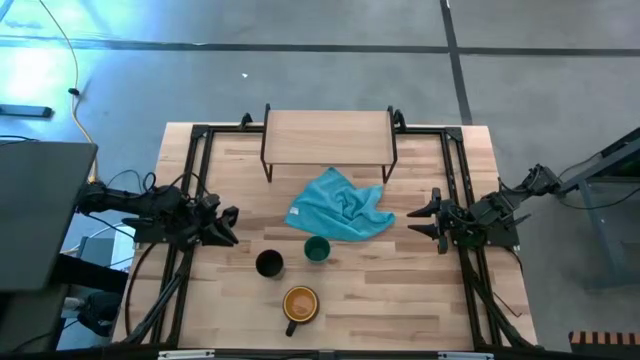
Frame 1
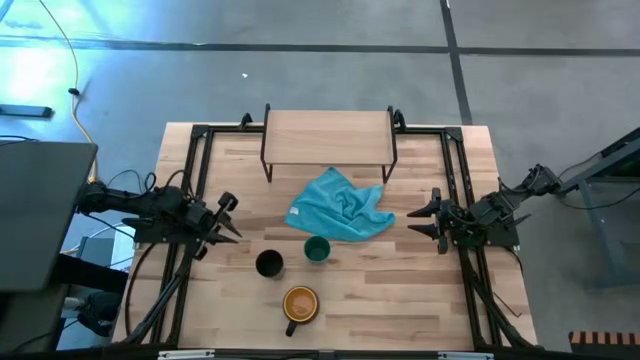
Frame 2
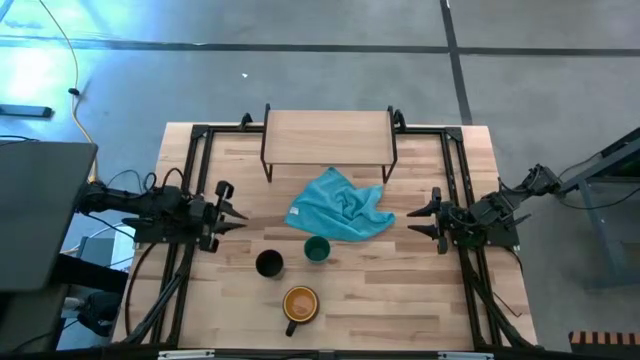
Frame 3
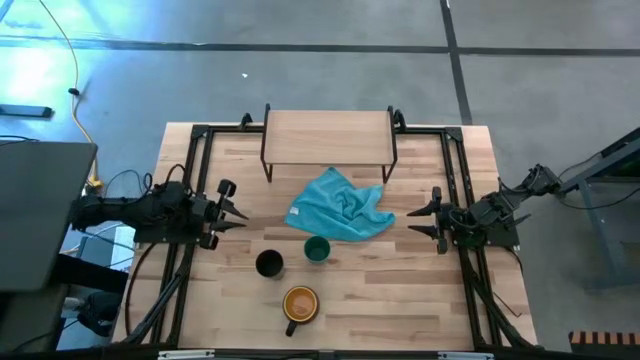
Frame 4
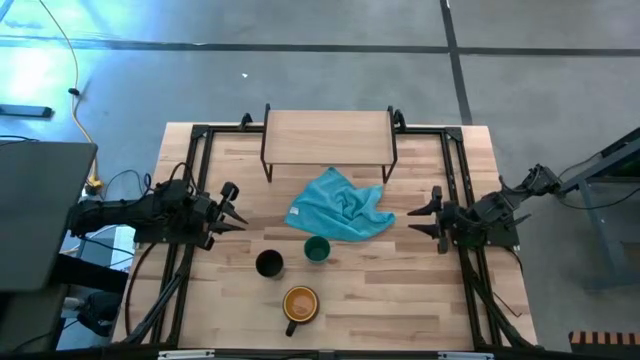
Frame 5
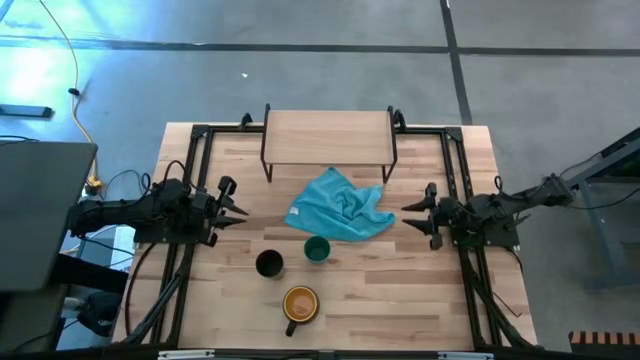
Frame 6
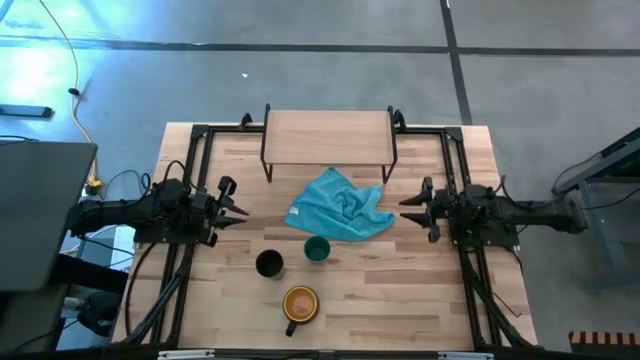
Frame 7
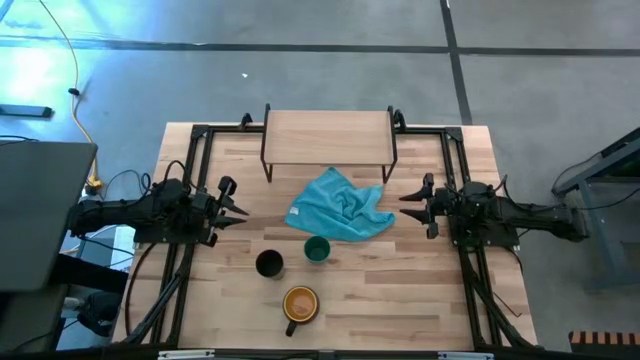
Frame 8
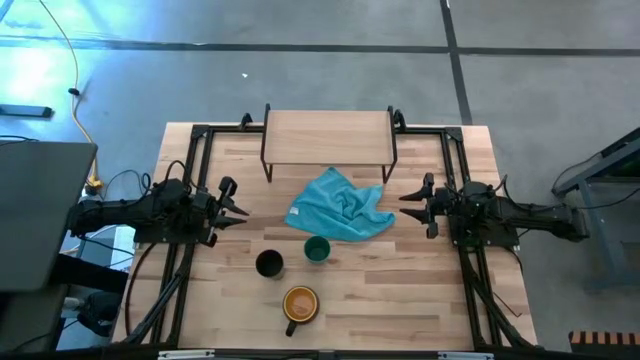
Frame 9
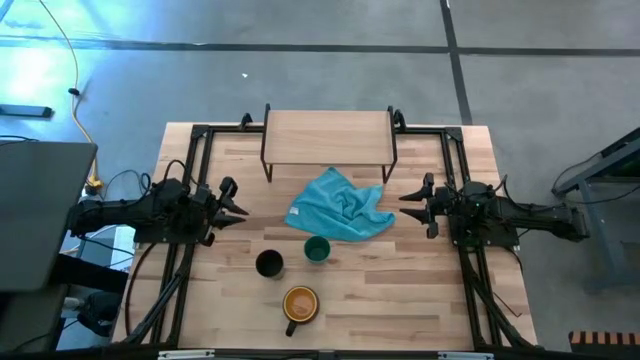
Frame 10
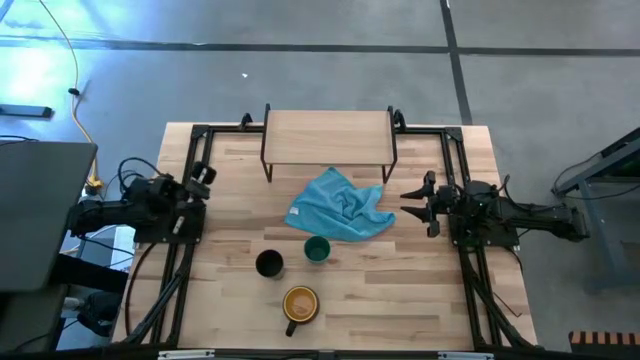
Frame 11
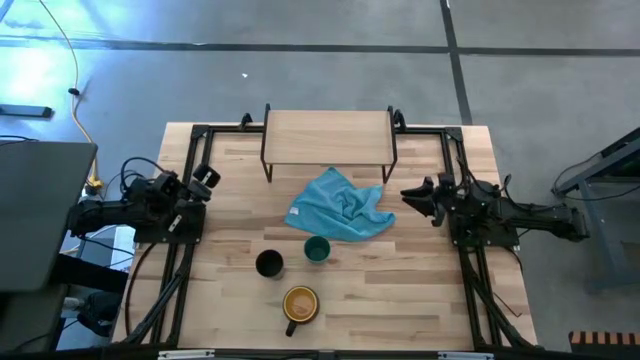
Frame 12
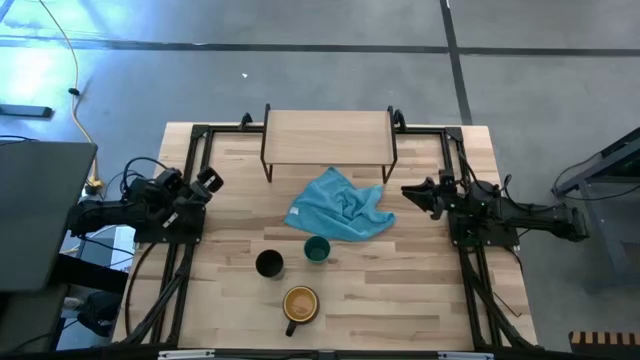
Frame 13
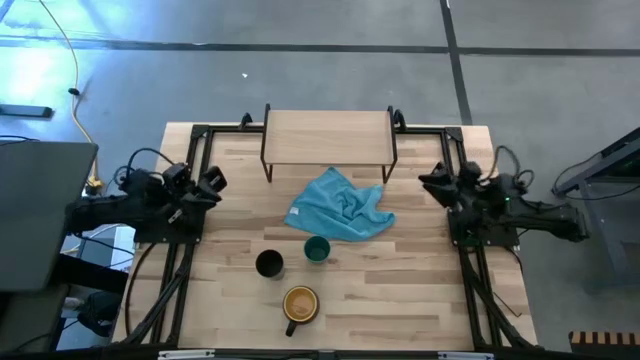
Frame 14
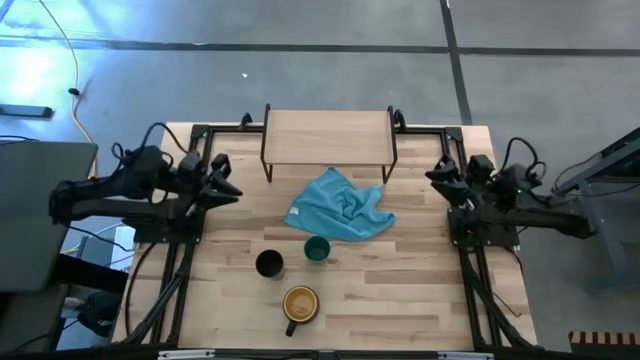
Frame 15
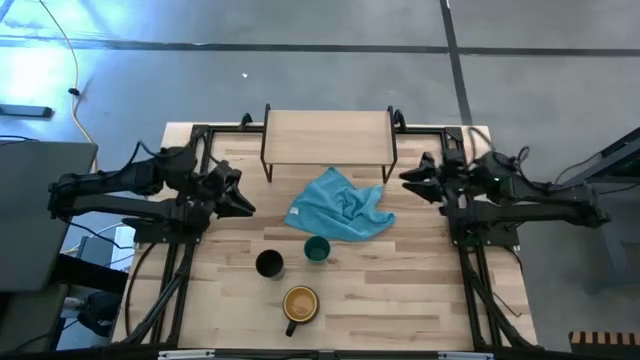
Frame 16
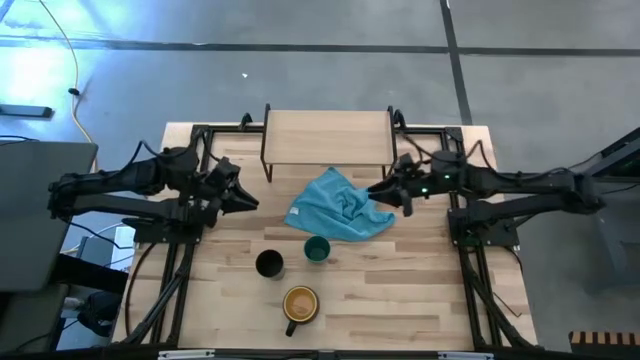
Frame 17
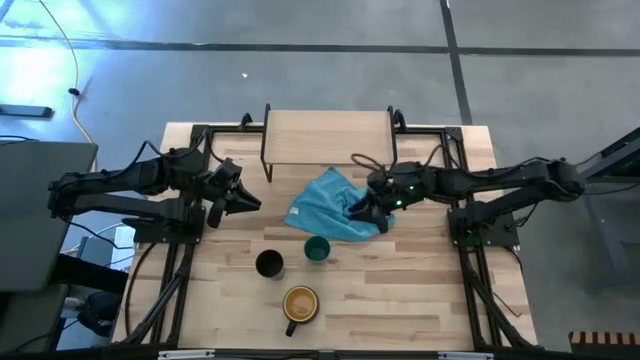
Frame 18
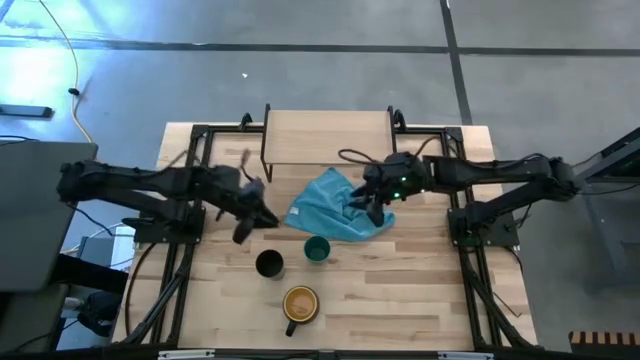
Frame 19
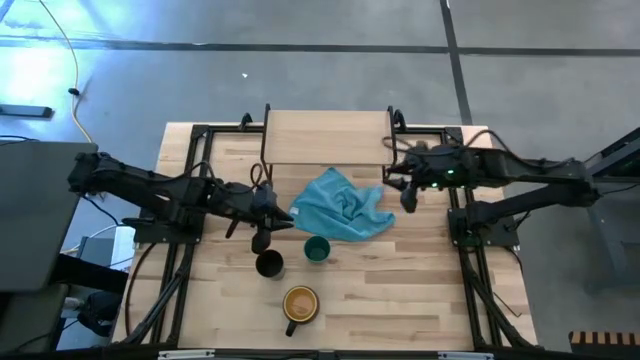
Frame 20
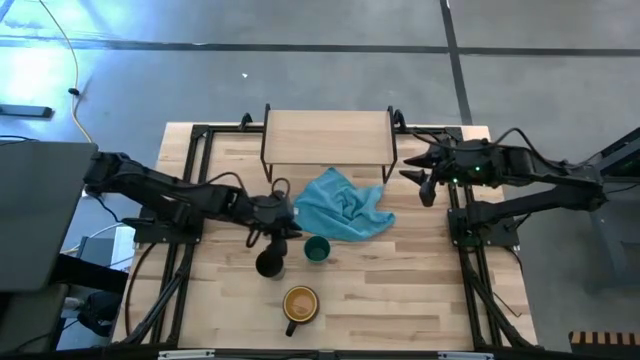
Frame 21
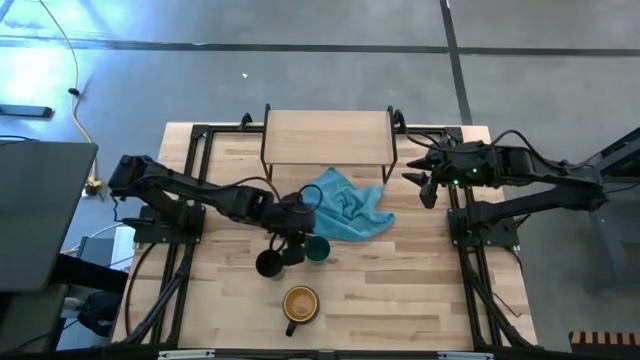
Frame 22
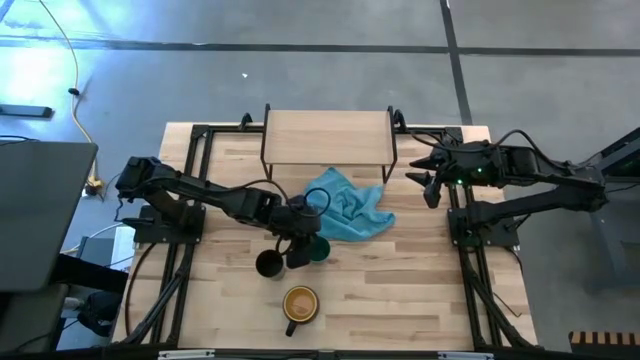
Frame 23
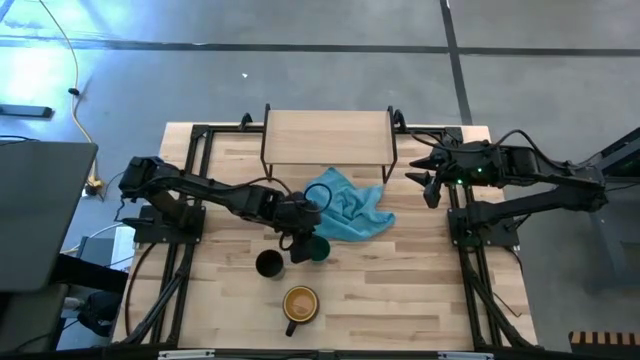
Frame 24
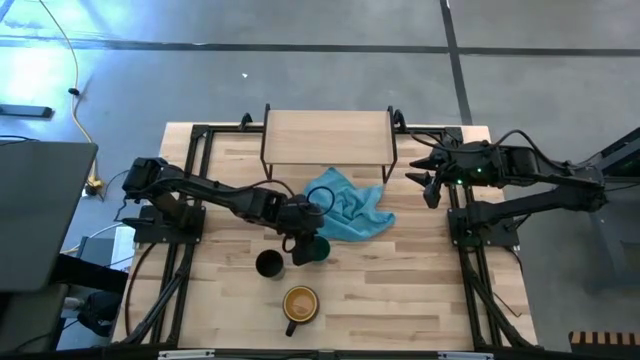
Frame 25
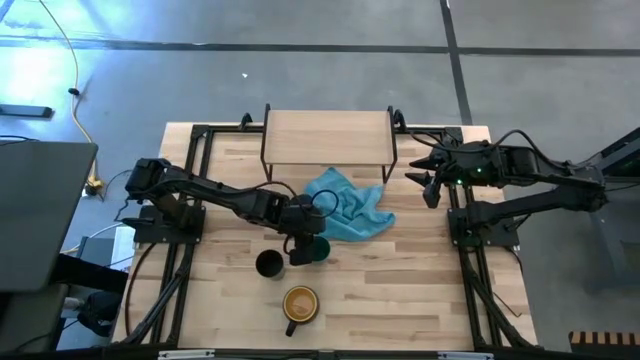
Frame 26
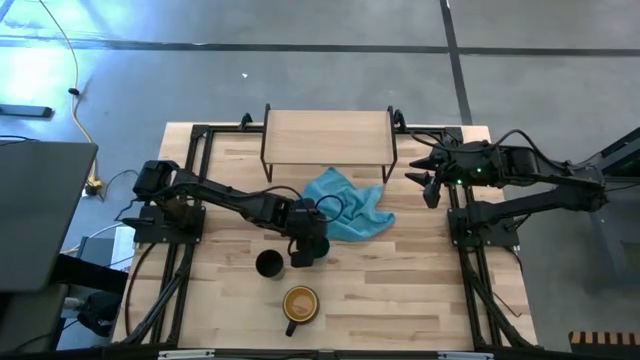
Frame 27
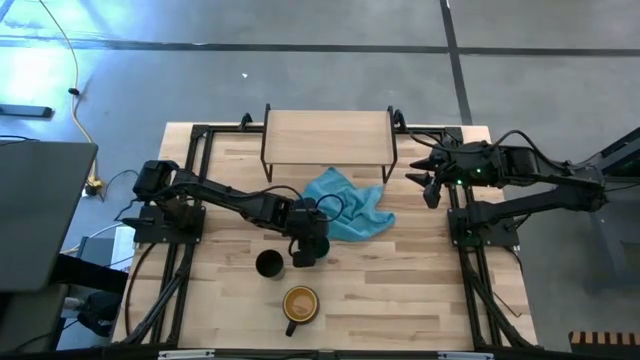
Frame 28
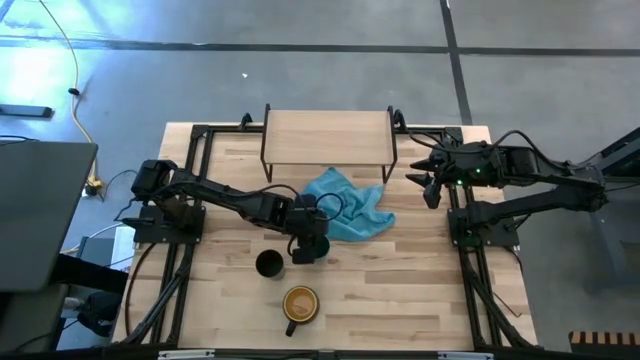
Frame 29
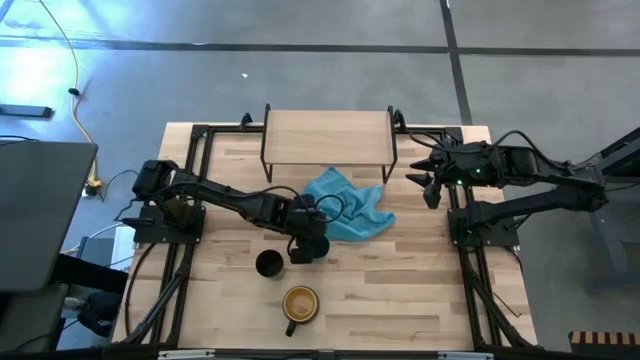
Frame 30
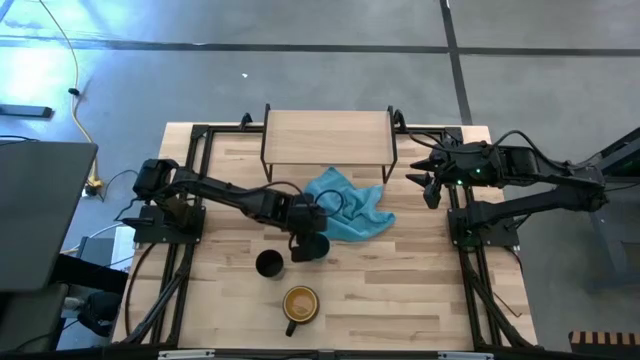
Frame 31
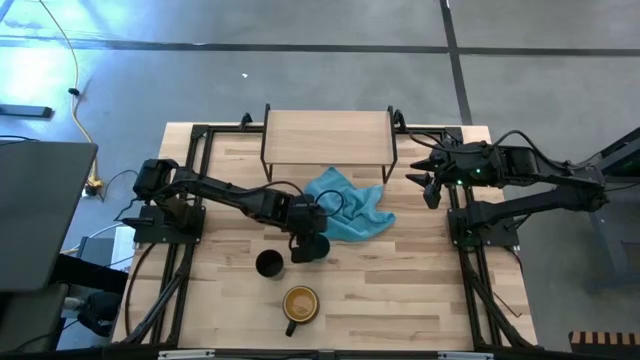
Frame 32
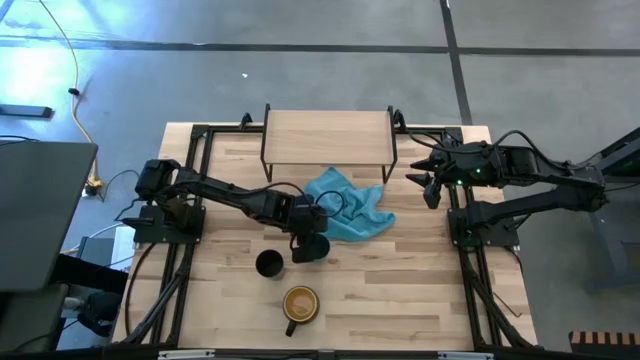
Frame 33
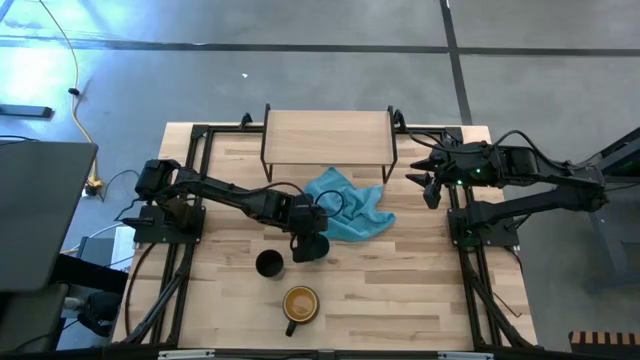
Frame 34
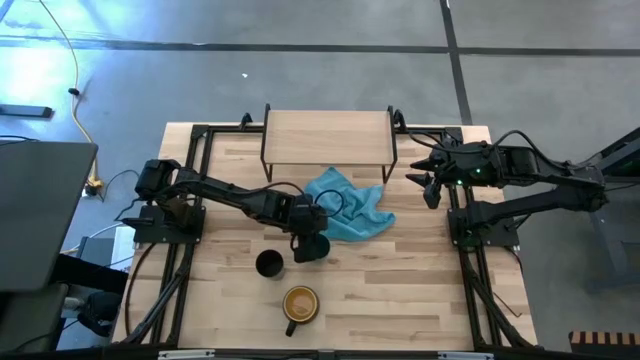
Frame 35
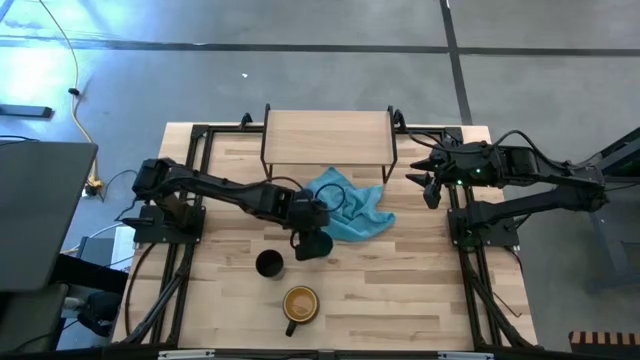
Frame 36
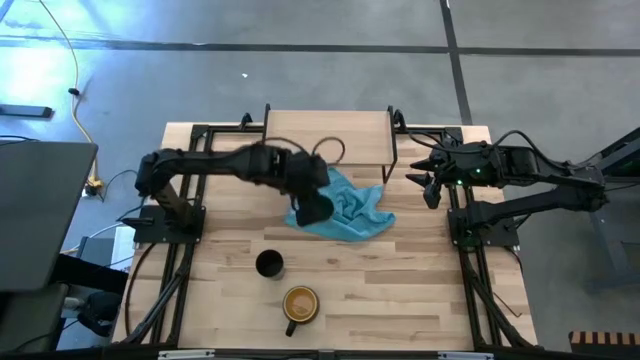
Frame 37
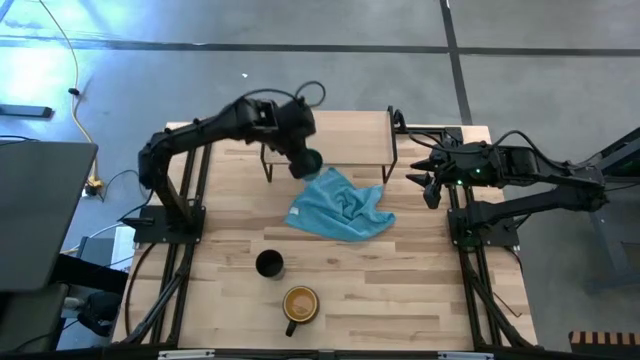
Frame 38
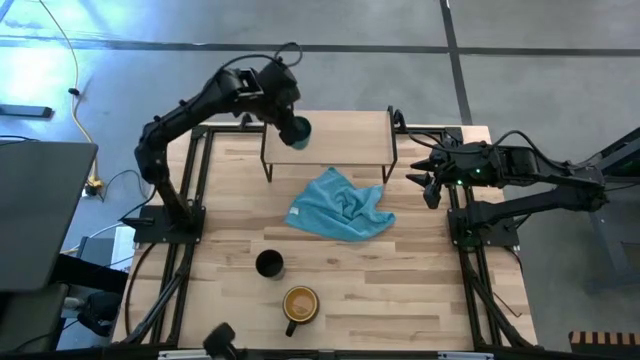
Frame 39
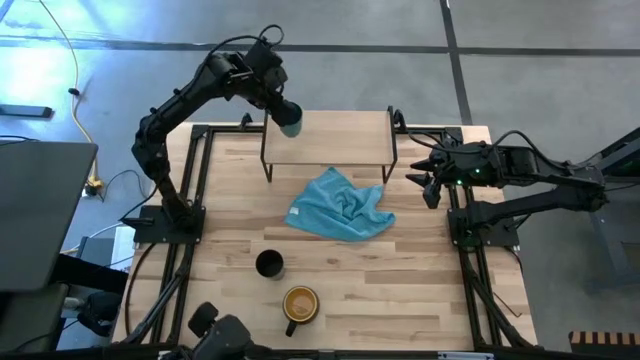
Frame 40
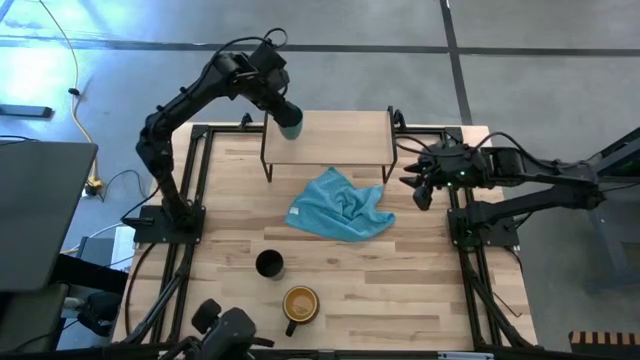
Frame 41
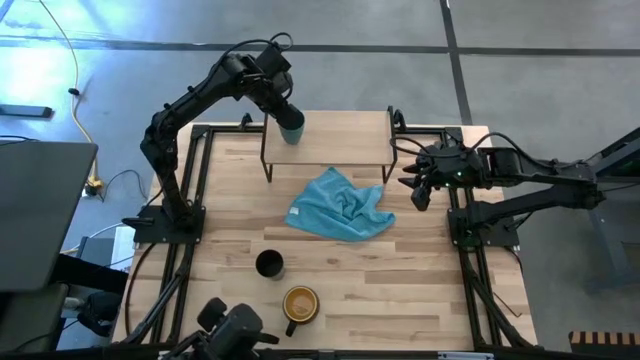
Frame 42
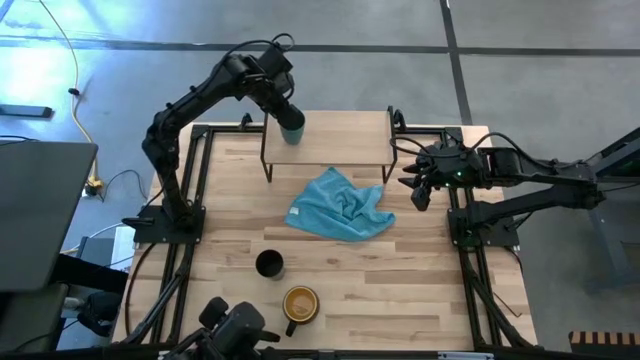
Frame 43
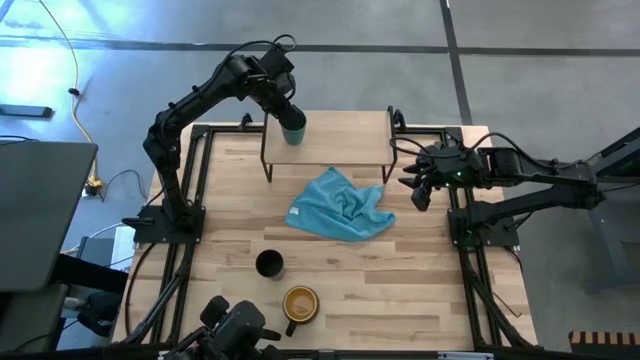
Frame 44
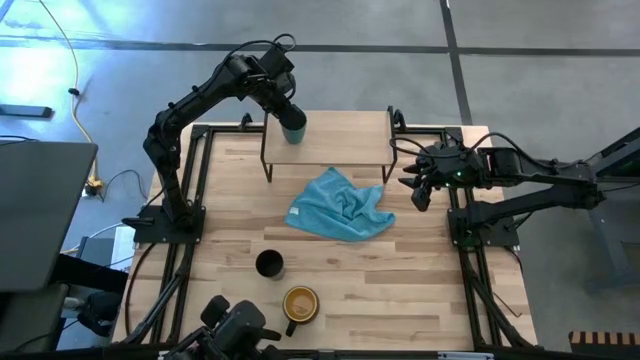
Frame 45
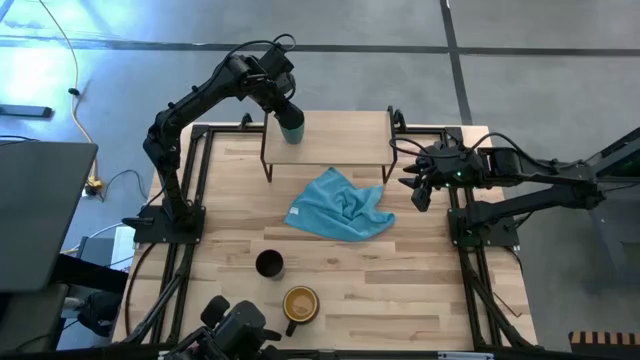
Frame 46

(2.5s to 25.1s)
Task: Stack small to large cups/mugs on shelf
Put the green cup on the shelf
